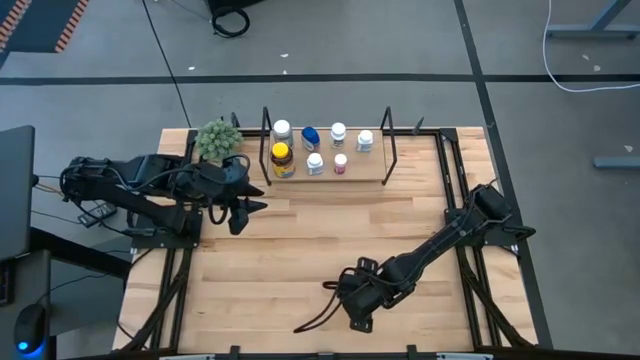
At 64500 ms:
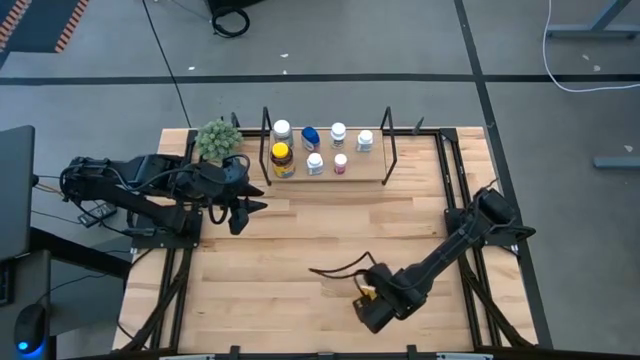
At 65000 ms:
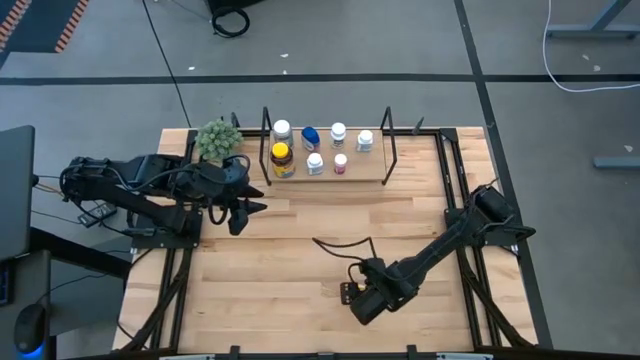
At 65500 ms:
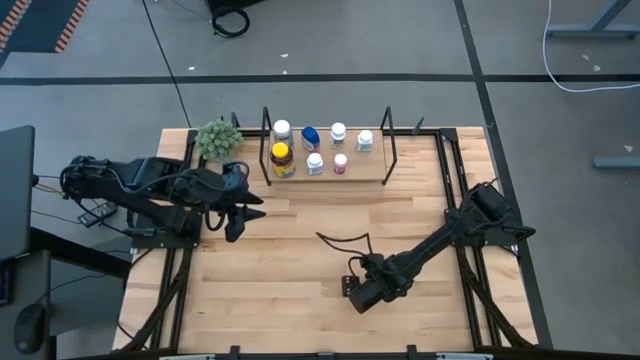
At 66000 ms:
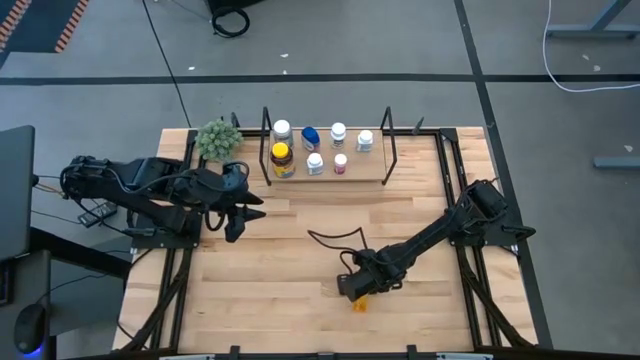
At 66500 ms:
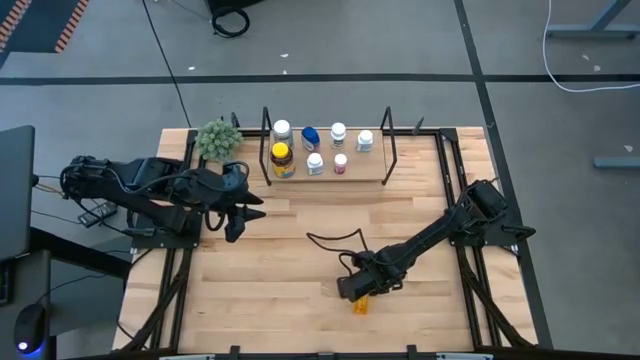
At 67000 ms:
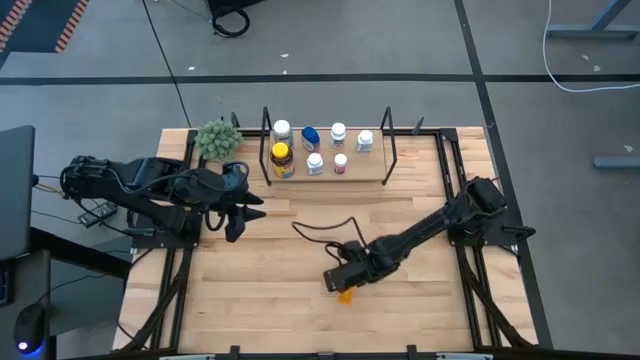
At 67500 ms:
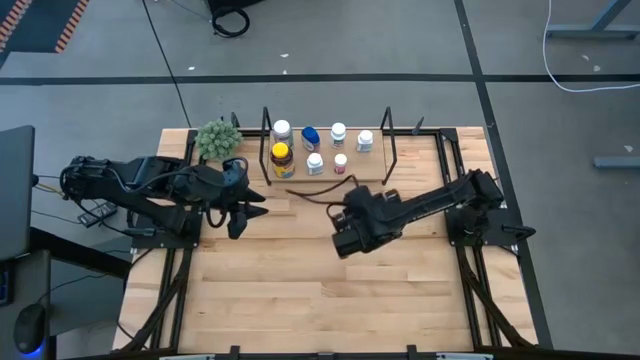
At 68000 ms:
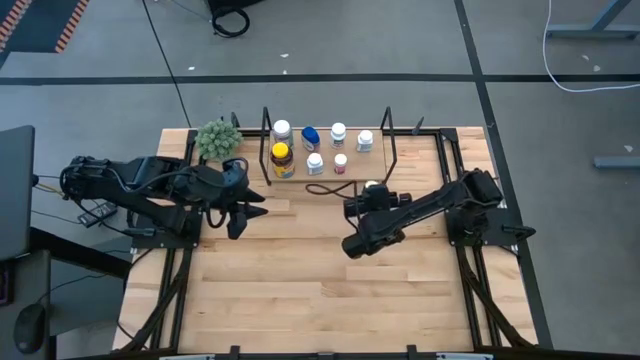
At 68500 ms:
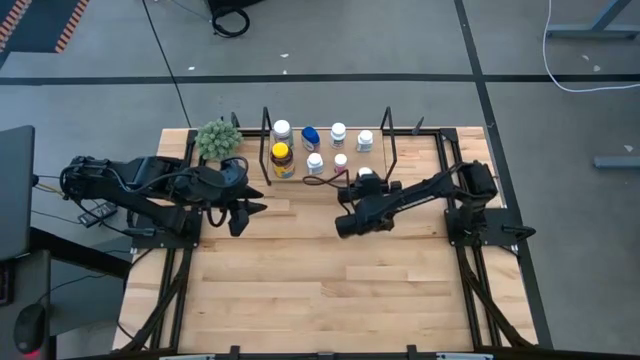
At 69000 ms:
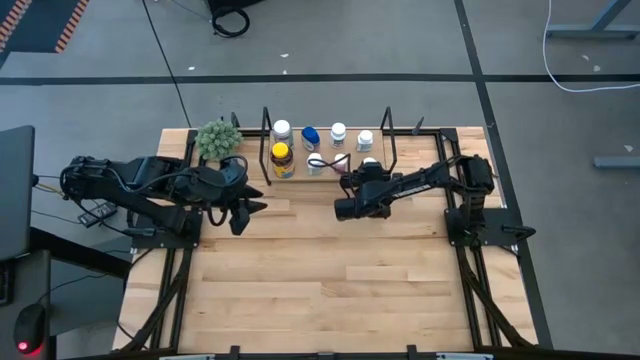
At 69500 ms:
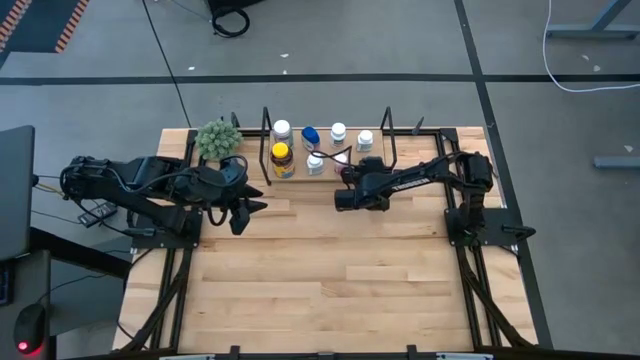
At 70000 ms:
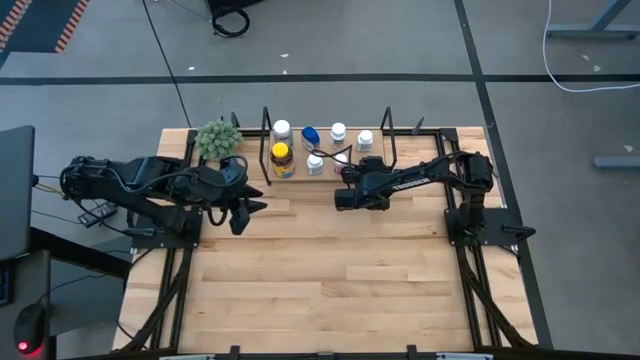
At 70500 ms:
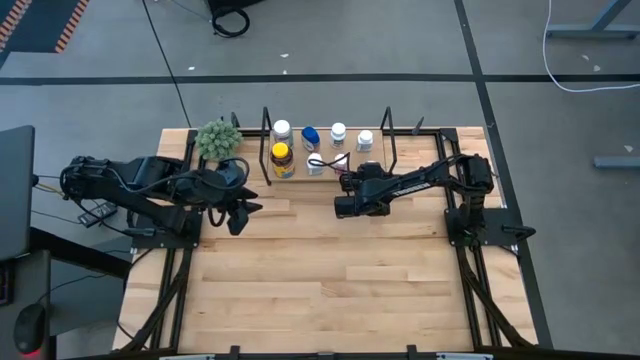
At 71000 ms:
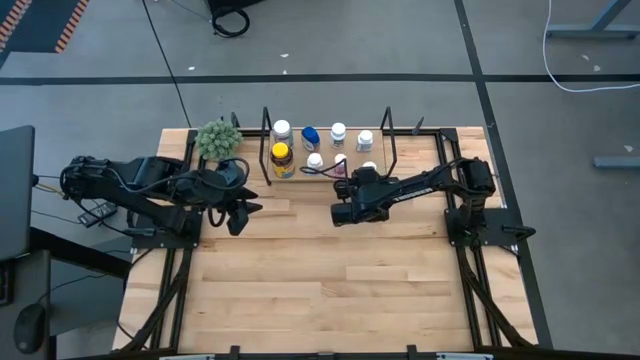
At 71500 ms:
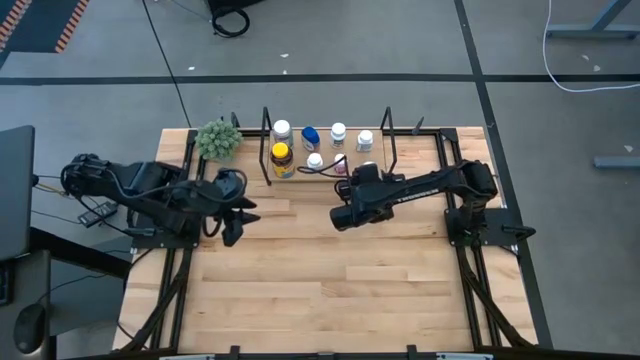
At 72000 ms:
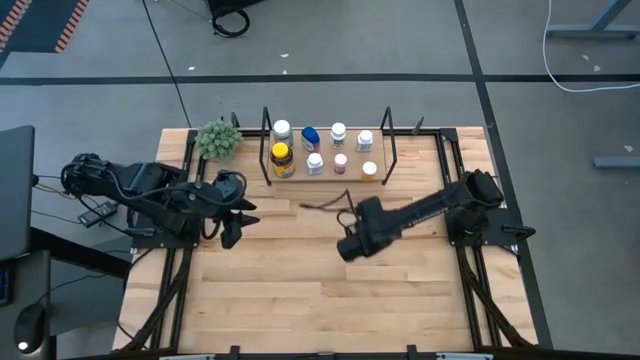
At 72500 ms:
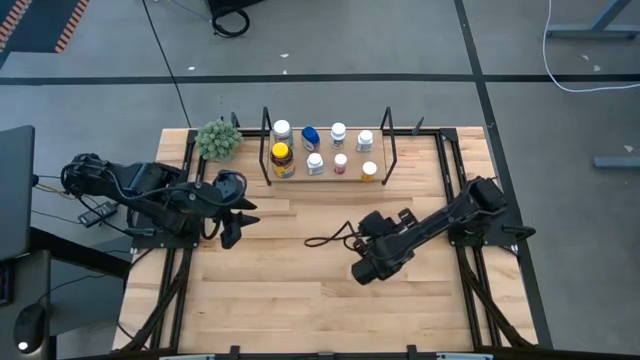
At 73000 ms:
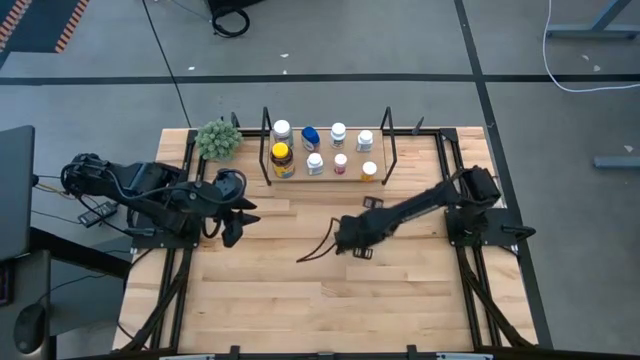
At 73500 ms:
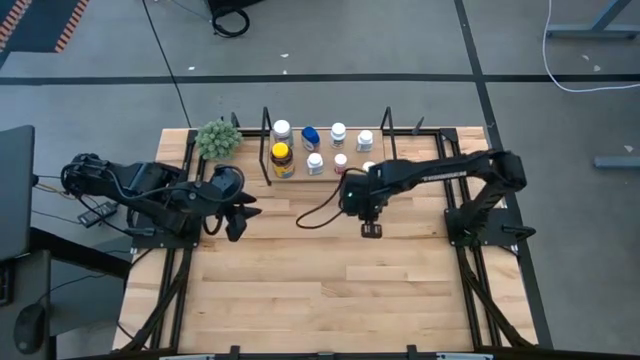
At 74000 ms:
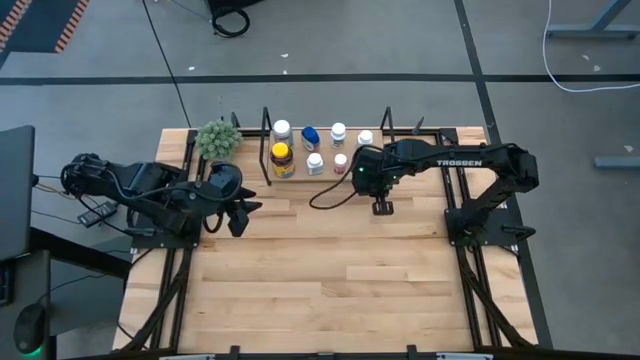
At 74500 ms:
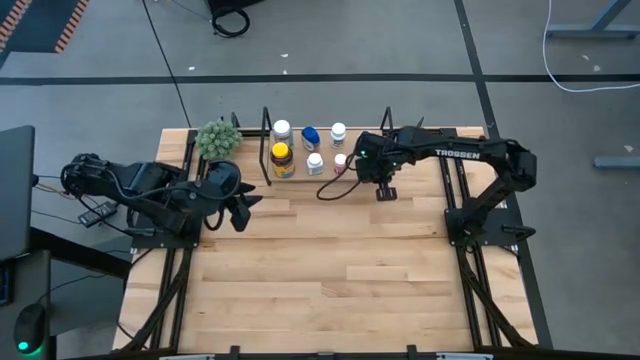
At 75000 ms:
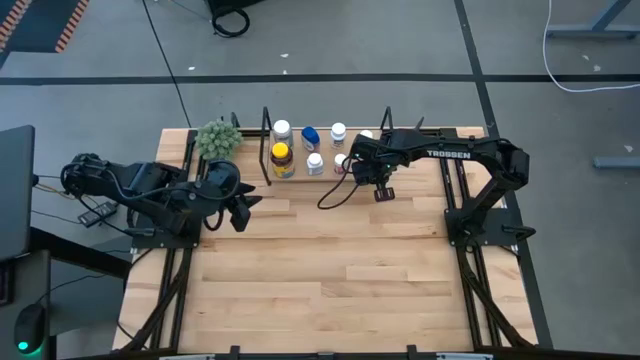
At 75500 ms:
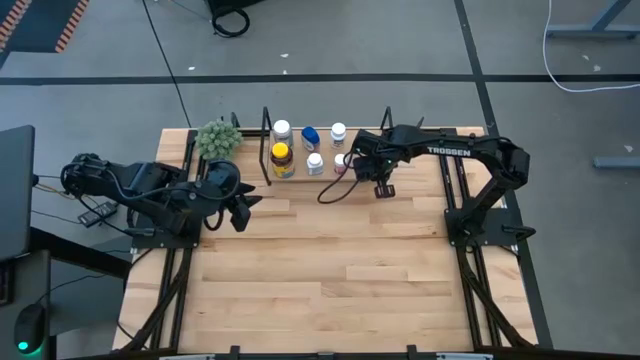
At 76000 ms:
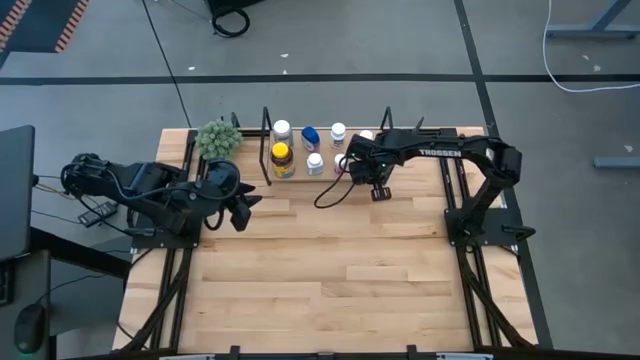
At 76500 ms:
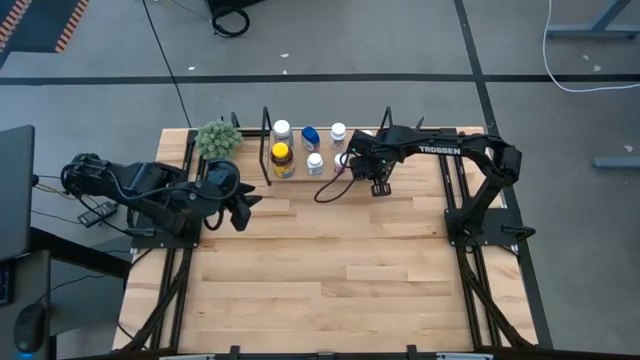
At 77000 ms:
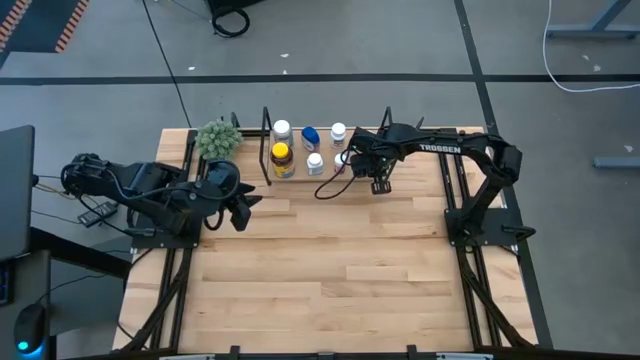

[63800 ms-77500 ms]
Task: Pick and place medicine bottles onto shelf by color
Put the orange medicine bottle on the shelf

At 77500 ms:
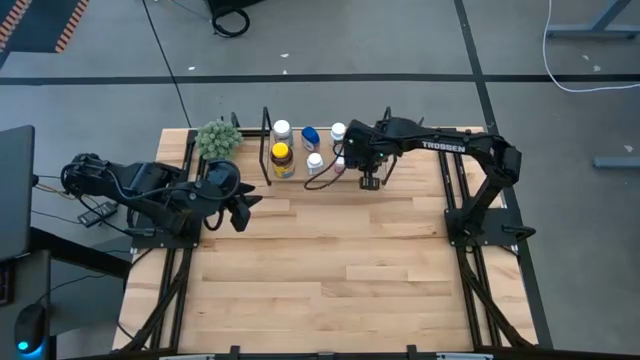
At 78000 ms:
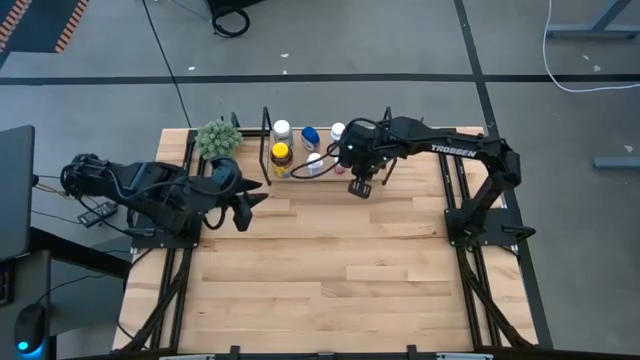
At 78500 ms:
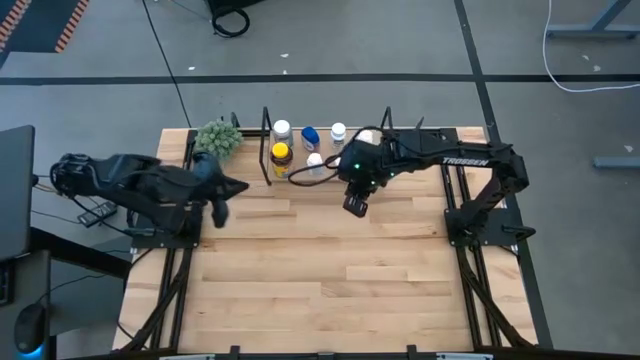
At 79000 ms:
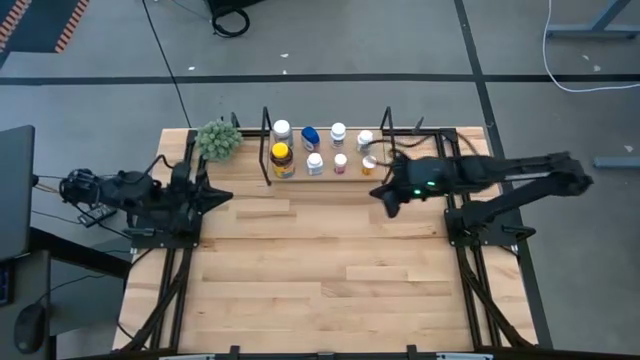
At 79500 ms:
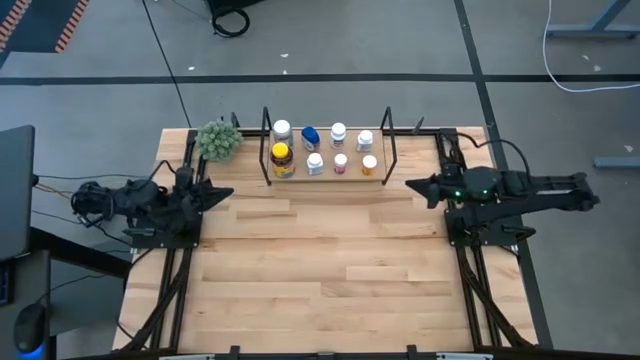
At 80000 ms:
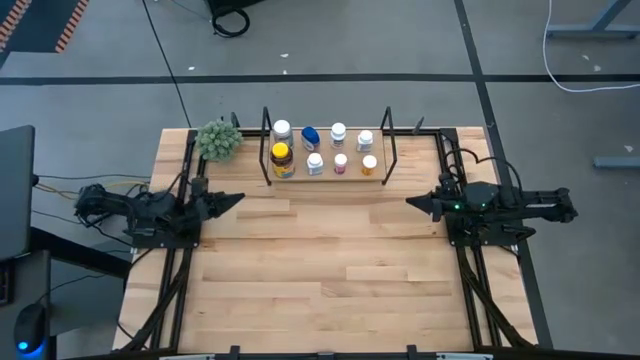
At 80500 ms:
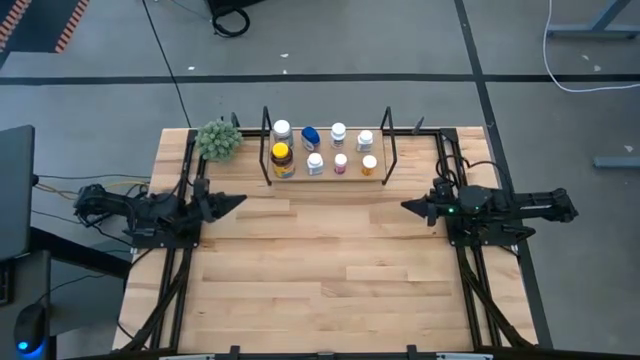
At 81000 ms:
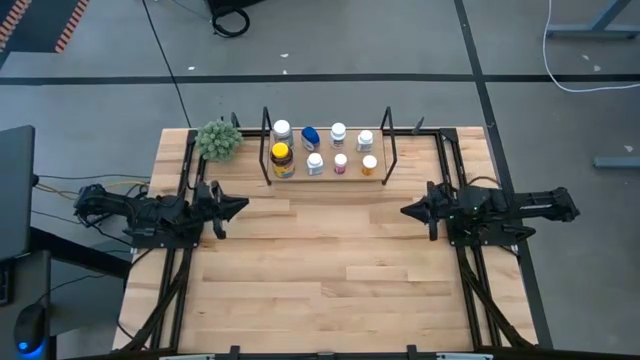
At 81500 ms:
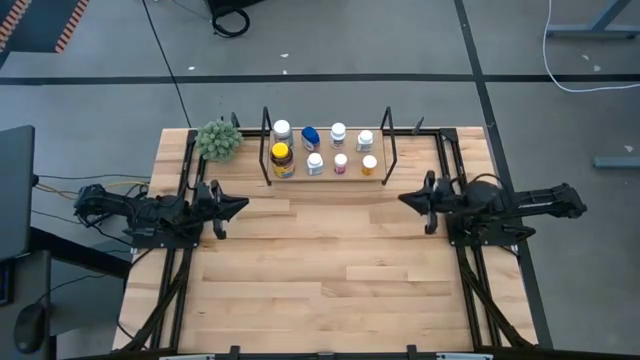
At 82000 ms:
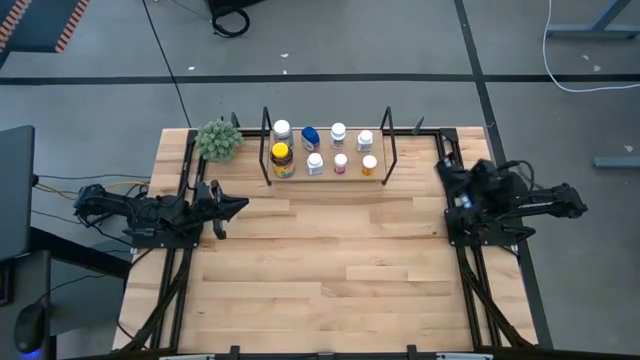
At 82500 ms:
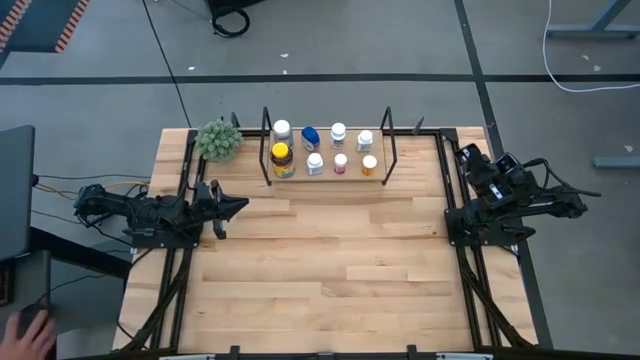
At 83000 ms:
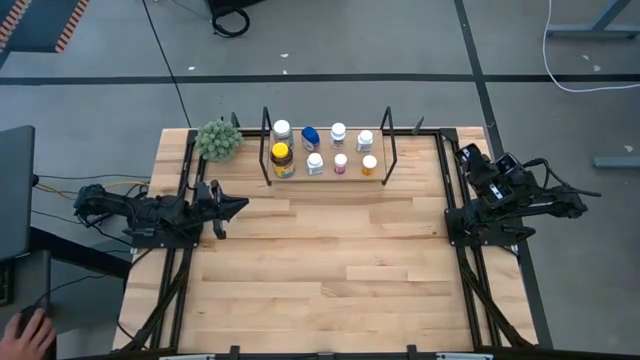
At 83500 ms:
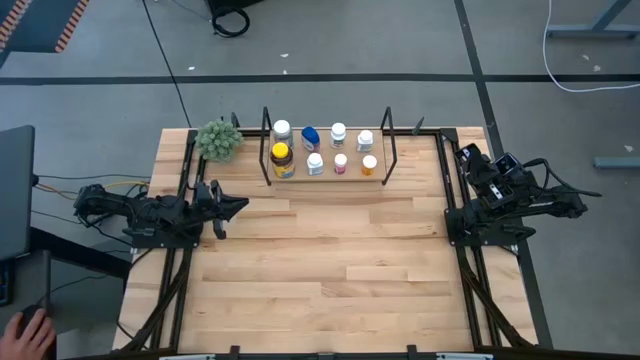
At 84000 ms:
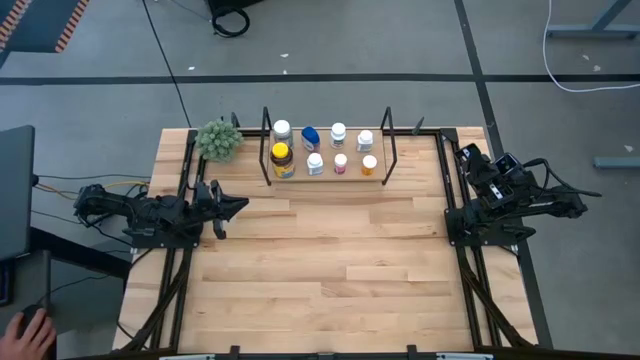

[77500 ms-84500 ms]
Return to Home Position
